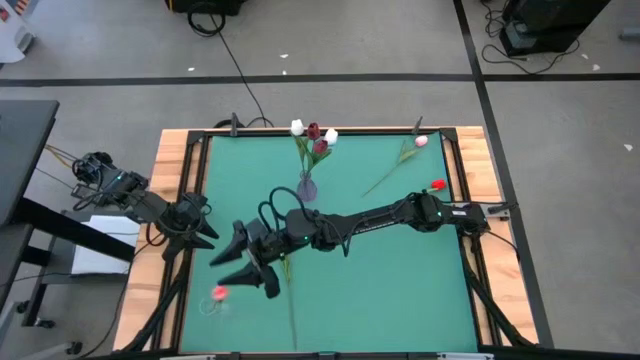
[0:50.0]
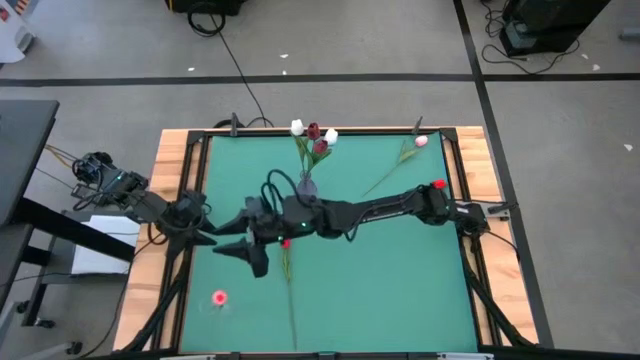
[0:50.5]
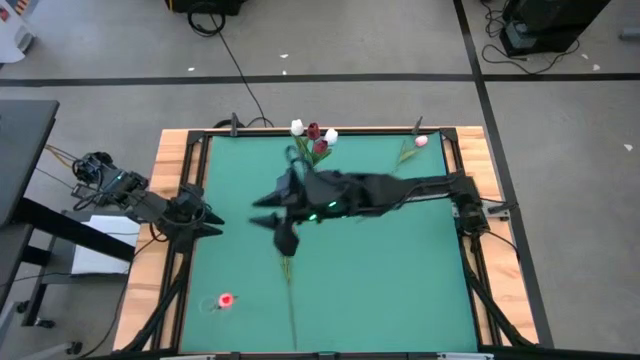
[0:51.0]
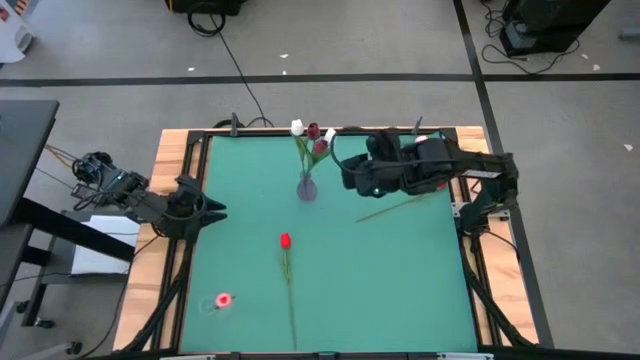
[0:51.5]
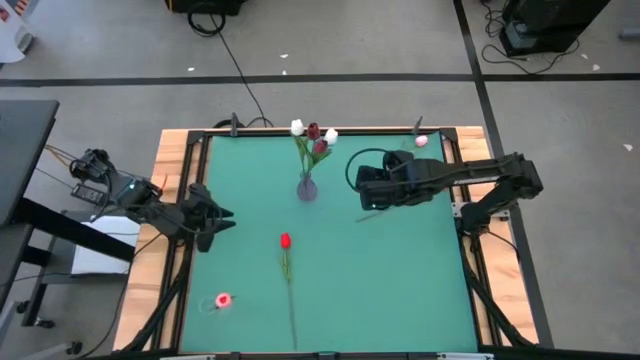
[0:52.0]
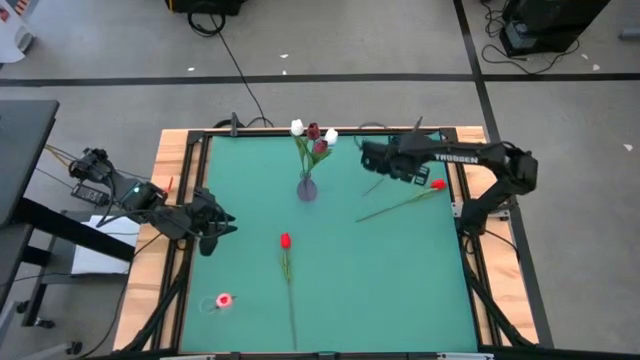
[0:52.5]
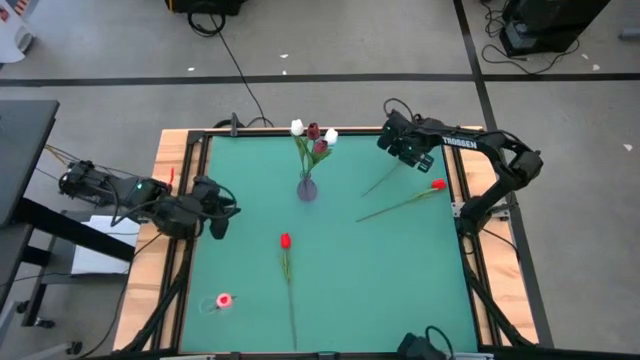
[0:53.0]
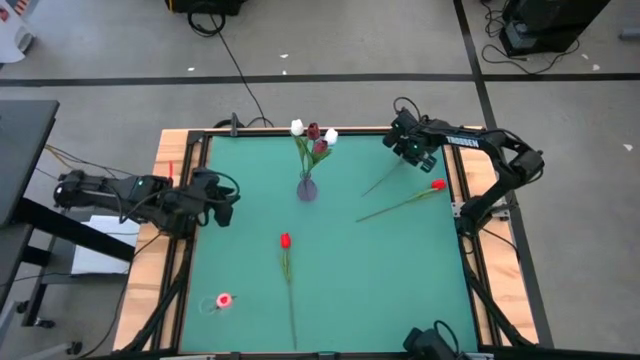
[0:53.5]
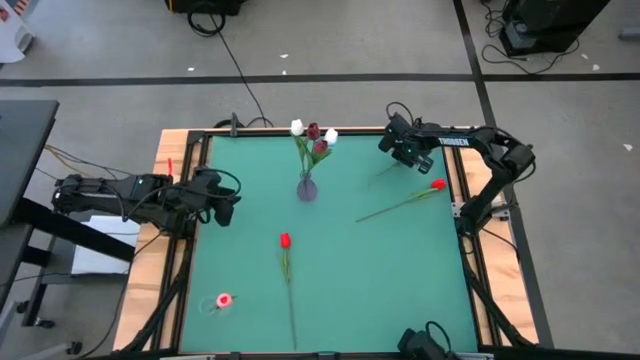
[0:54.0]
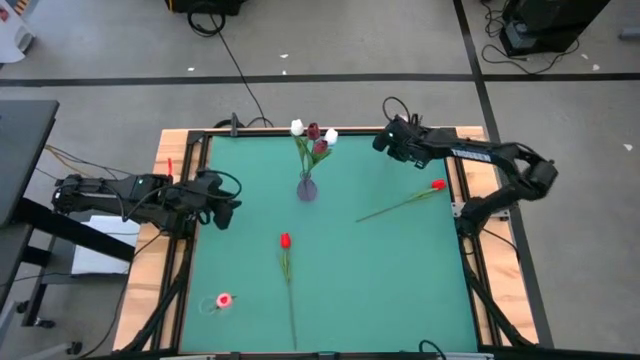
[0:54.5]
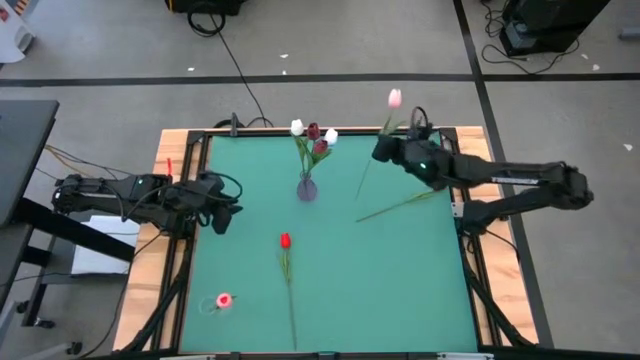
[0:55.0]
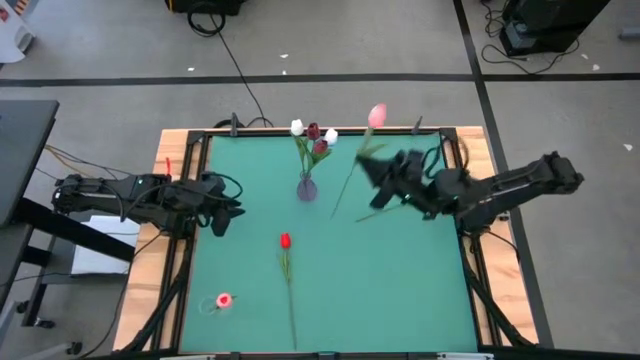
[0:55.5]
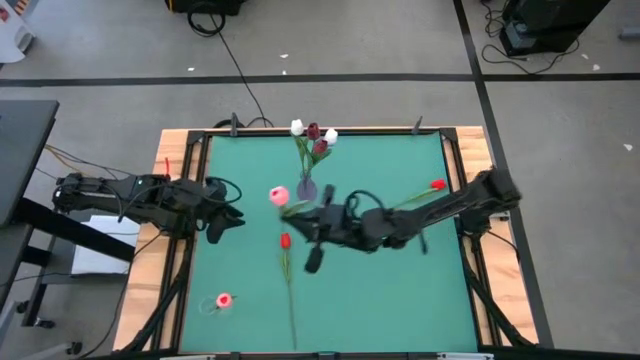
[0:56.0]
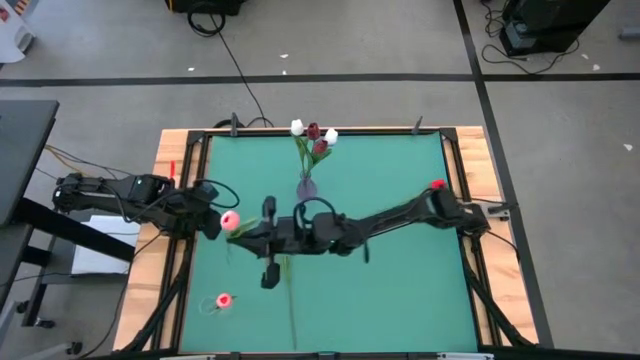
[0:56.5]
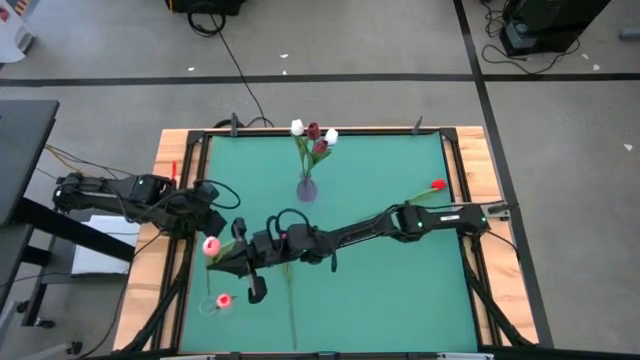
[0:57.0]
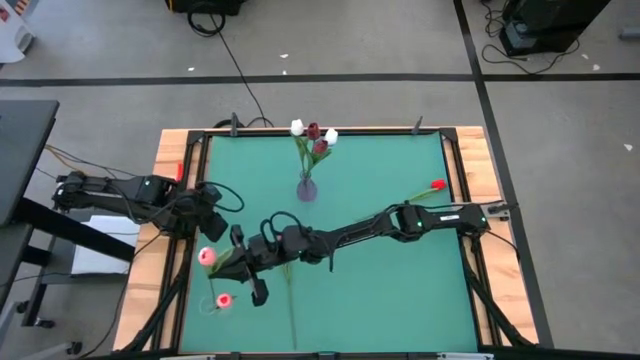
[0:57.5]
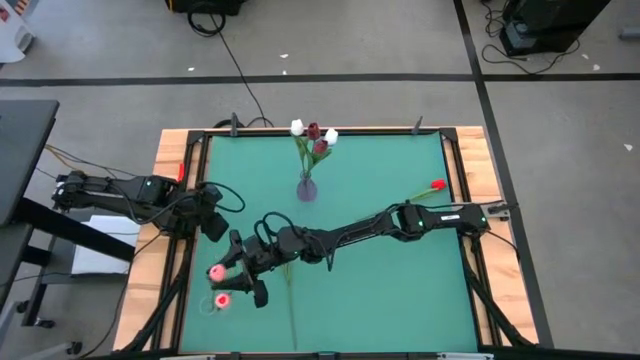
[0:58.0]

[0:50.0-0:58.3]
Task: Sort flowers into vase by color
Put the pink tulip into the transparent vase

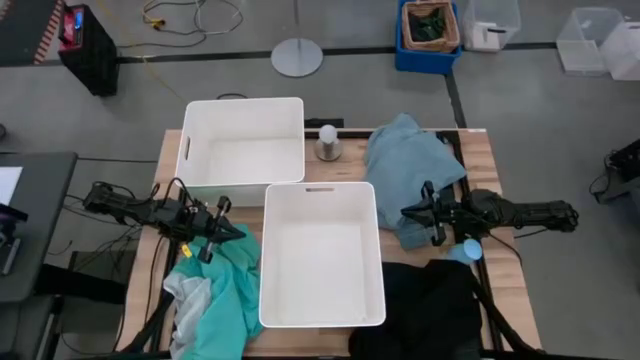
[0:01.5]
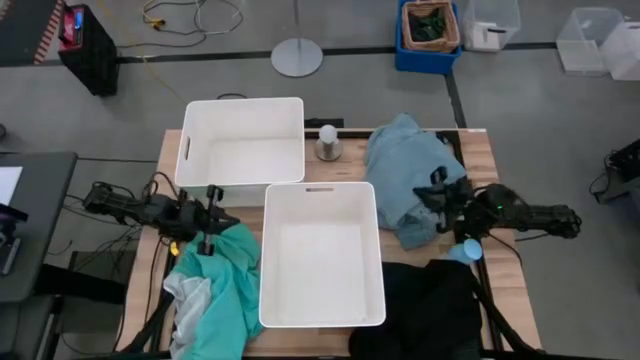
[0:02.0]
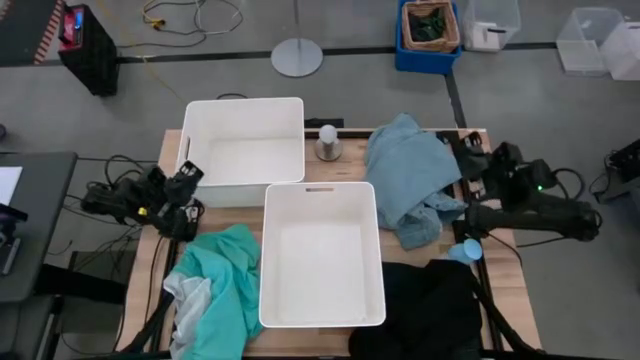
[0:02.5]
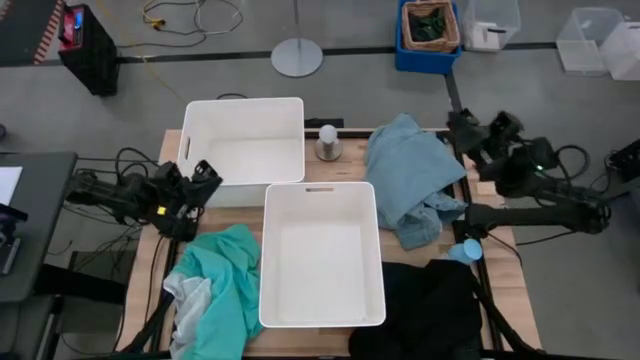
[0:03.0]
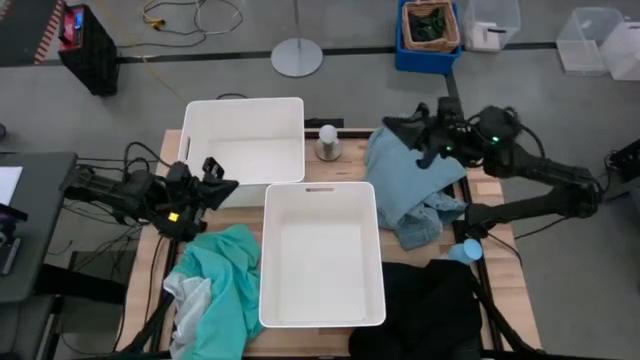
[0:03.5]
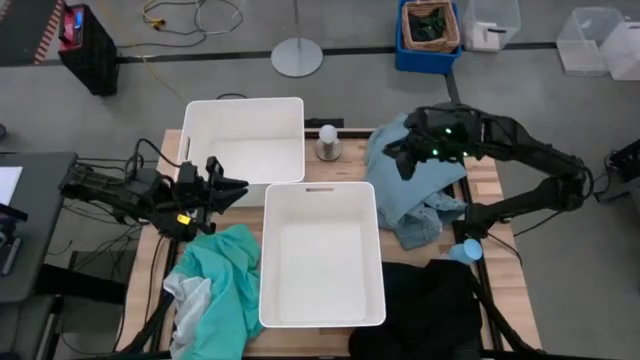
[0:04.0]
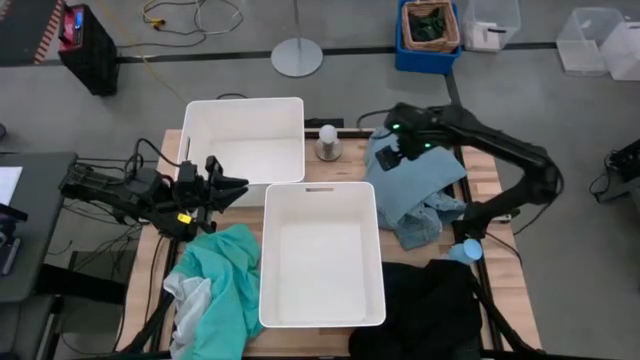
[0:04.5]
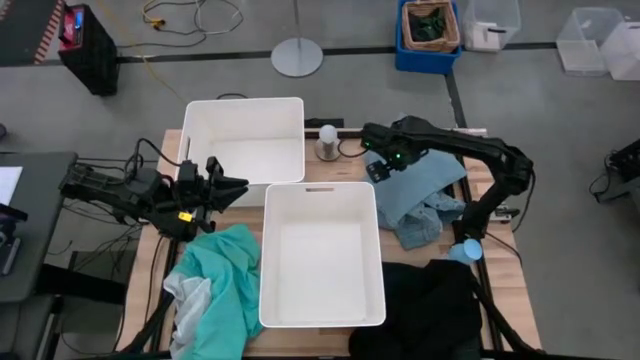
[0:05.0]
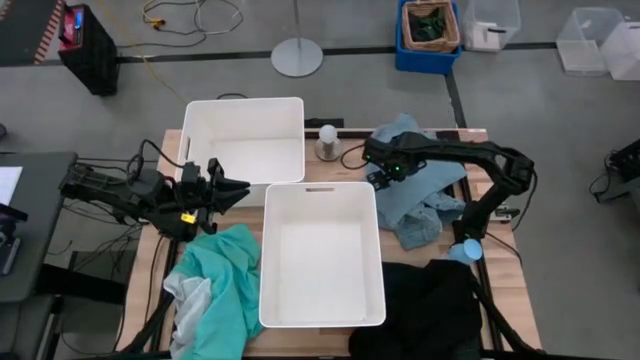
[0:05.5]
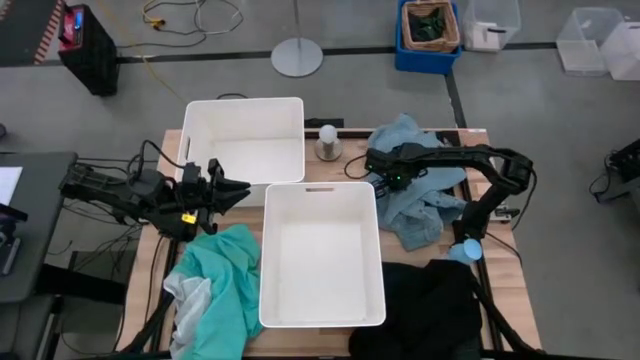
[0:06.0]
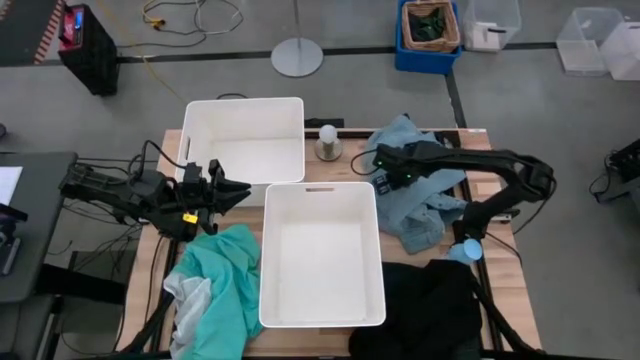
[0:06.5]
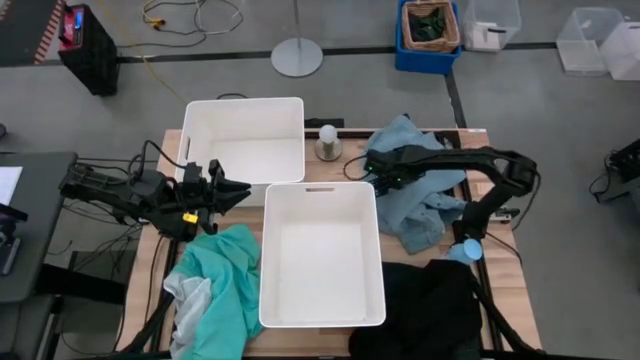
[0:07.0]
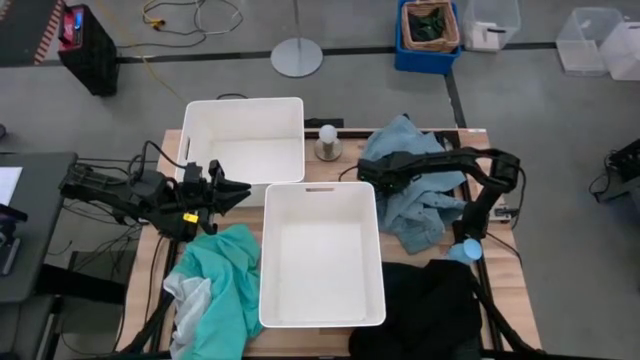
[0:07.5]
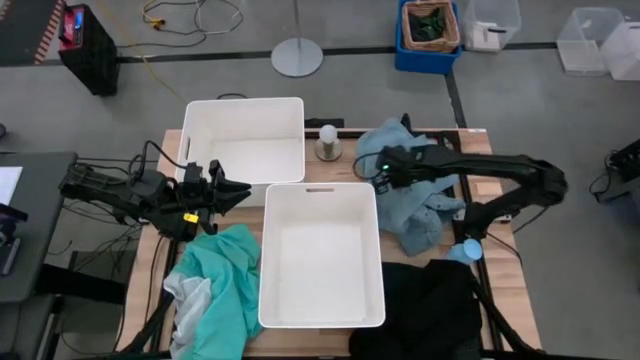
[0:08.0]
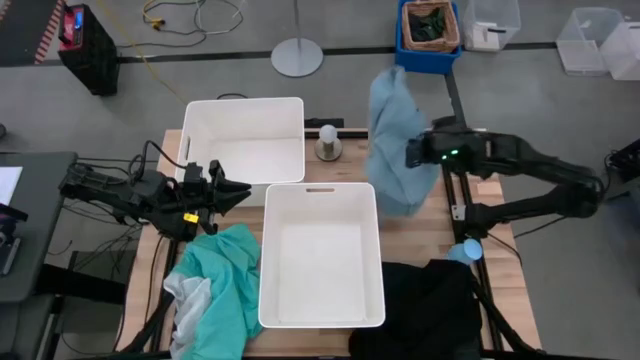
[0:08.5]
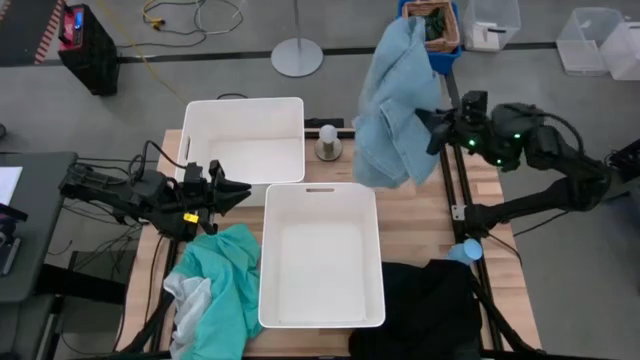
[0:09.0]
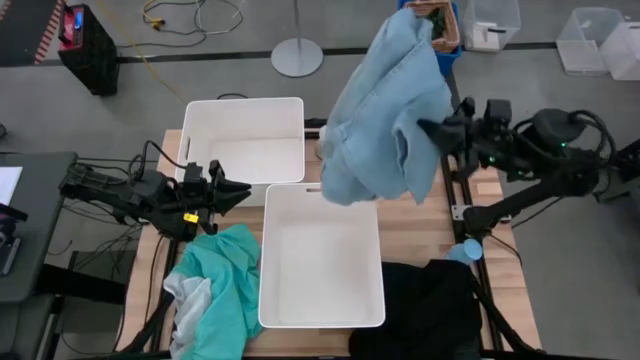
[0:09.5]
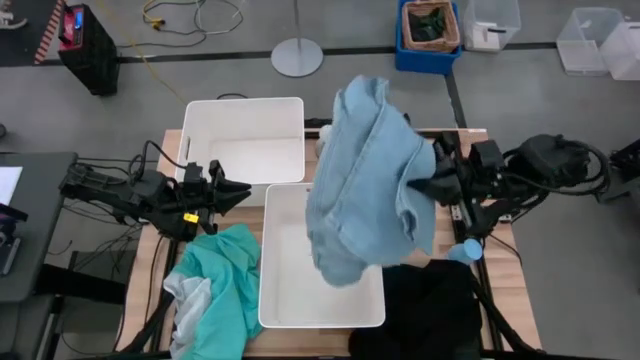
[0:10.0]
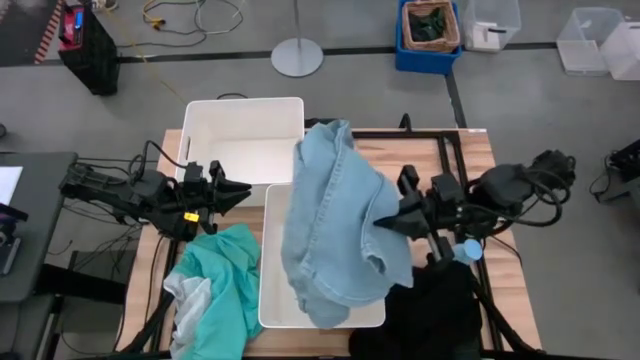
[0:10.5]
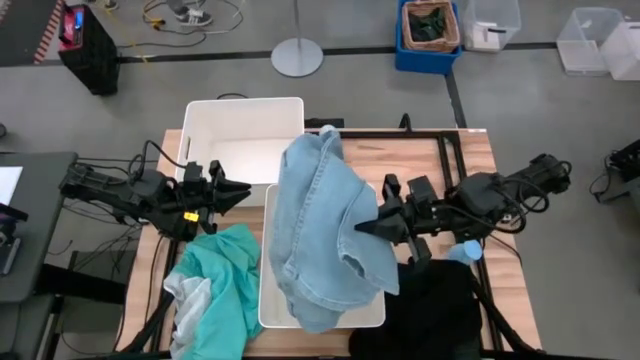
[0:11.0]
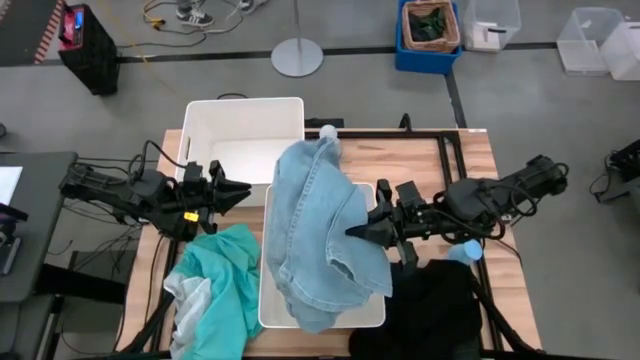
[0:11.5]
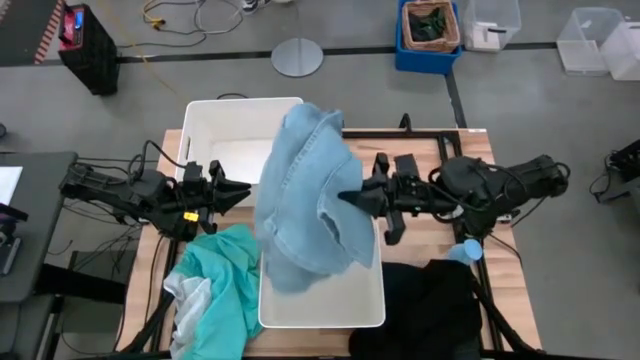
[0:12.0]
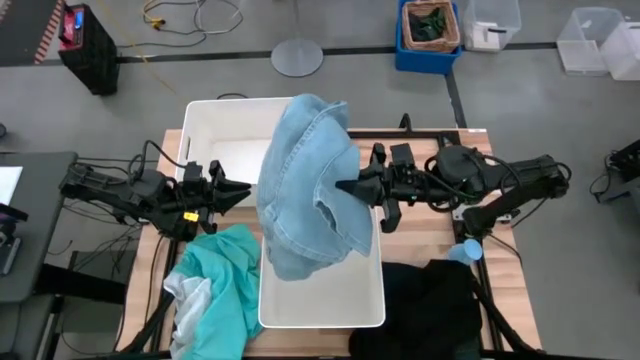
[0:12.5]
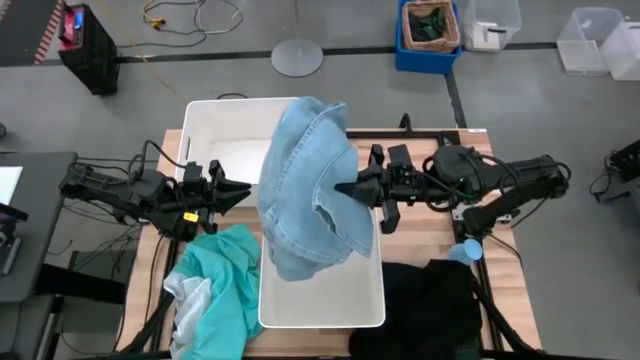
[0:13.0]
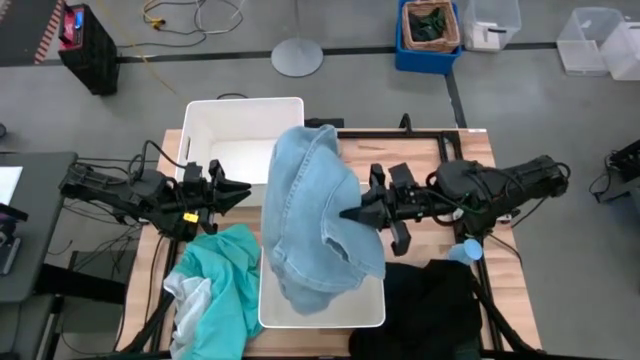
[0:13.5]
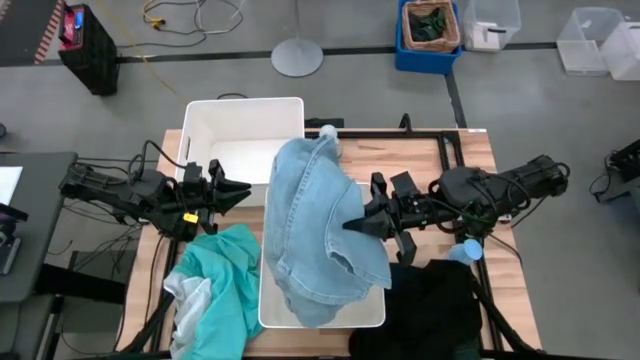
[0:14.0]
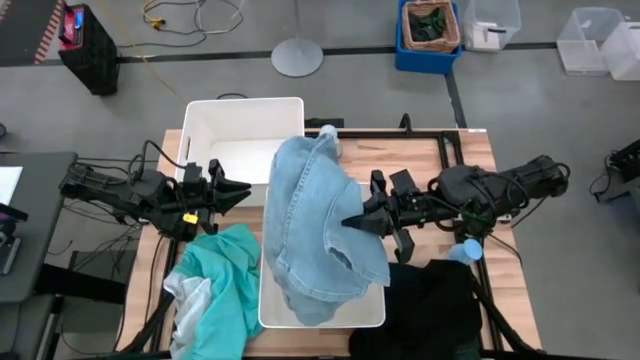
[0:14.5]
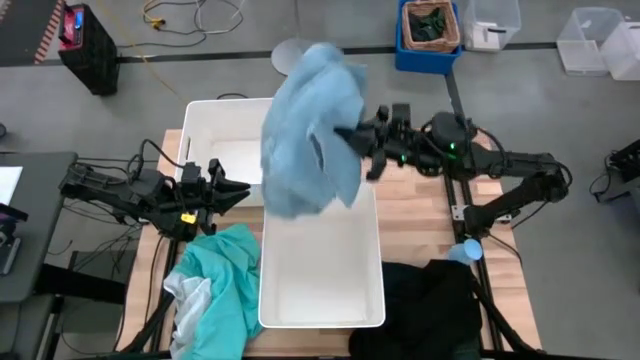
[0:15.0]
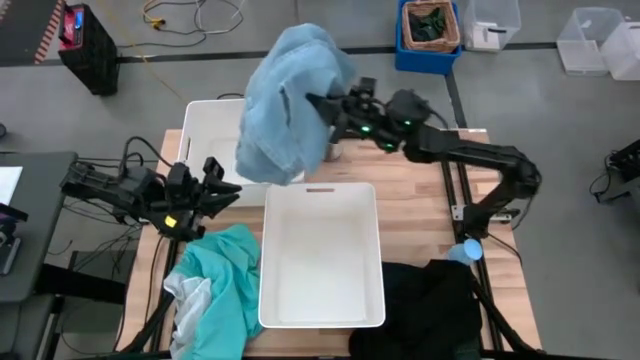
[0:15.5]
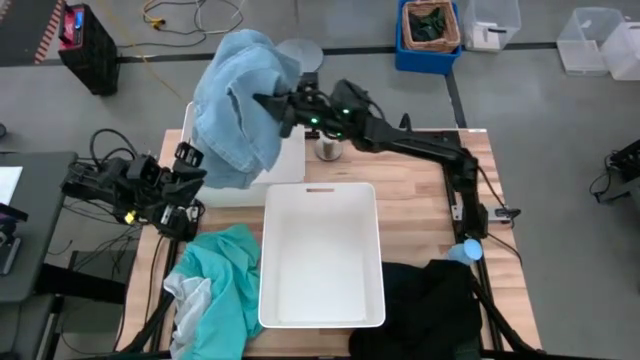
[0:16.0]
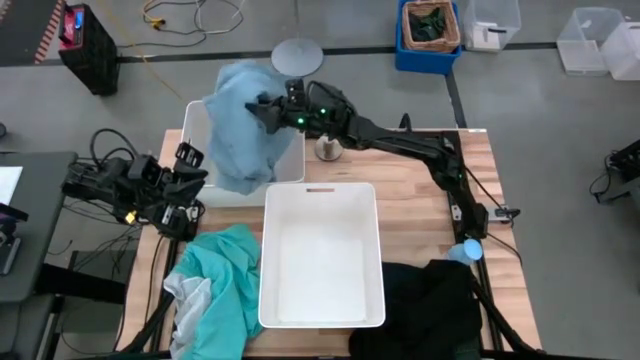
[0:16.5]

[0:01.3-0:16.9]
Task: Sort clothes
Put blue pants into the top white bin
